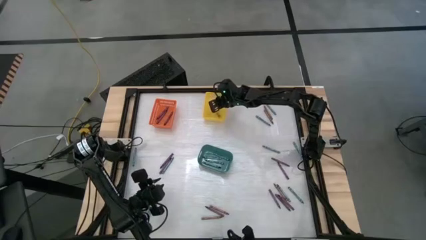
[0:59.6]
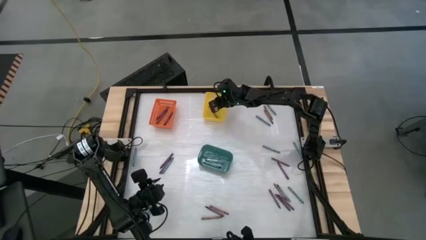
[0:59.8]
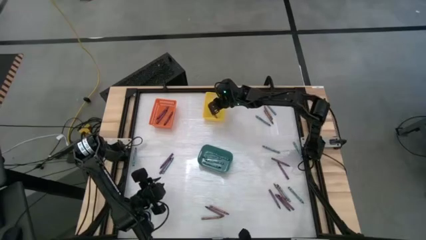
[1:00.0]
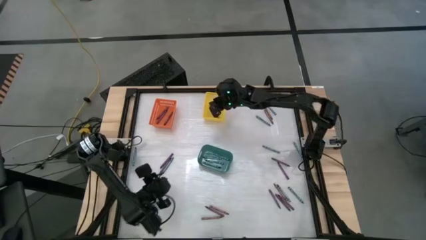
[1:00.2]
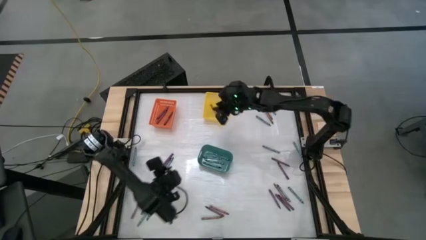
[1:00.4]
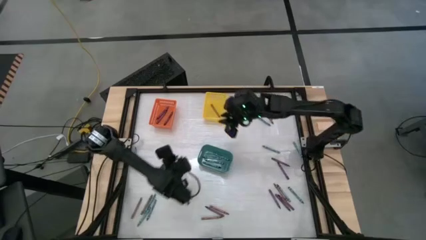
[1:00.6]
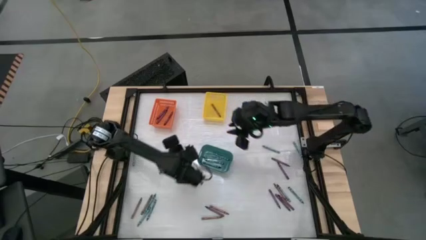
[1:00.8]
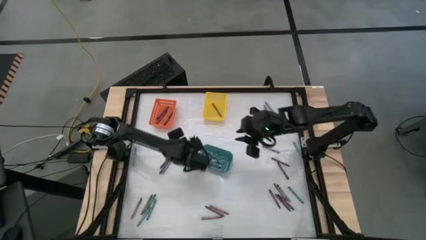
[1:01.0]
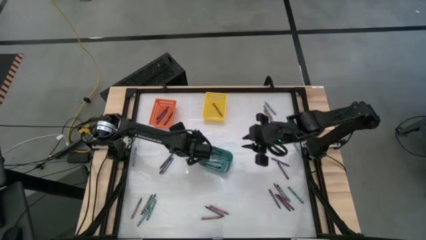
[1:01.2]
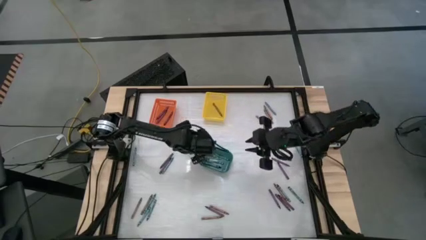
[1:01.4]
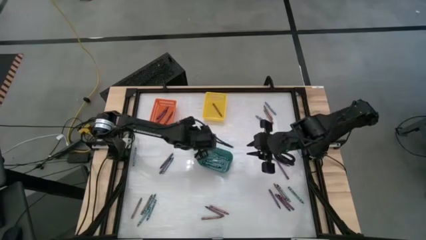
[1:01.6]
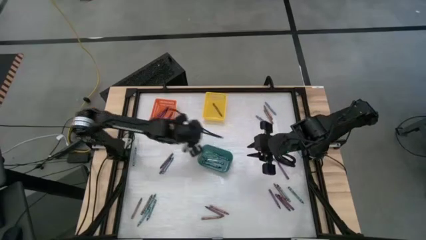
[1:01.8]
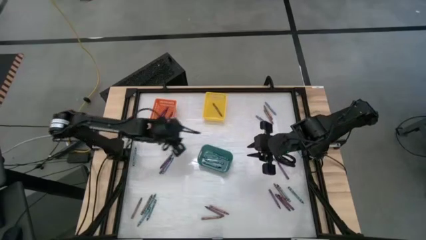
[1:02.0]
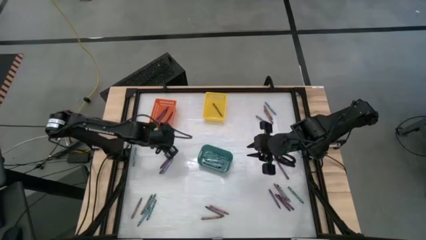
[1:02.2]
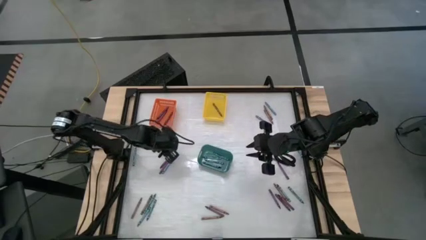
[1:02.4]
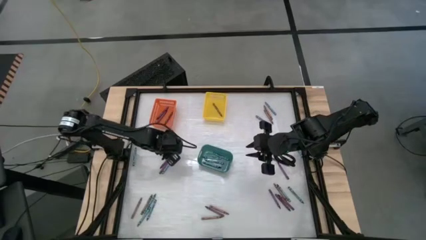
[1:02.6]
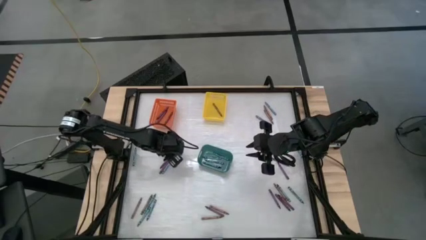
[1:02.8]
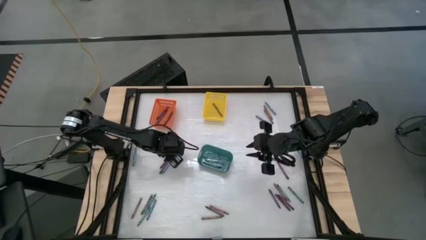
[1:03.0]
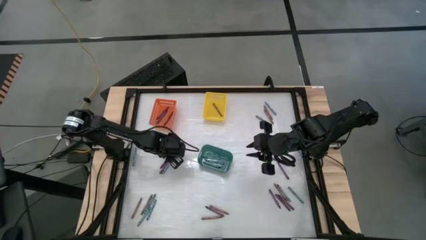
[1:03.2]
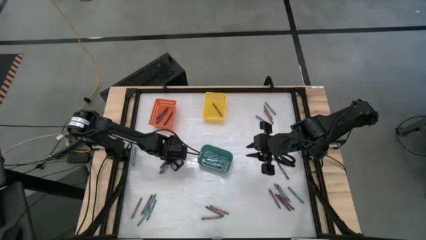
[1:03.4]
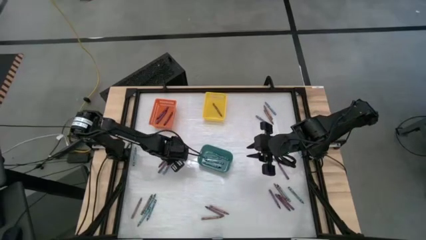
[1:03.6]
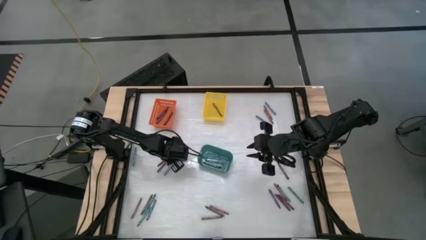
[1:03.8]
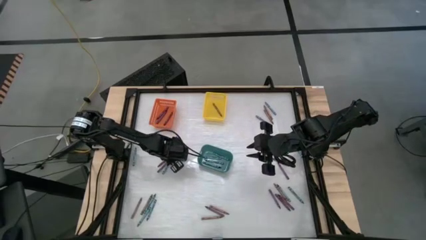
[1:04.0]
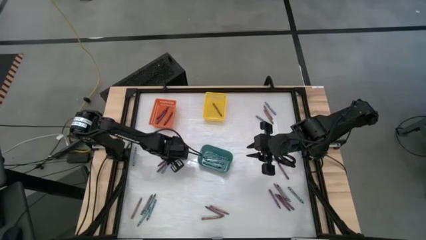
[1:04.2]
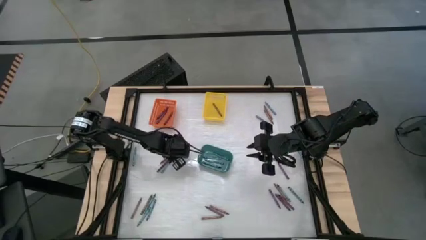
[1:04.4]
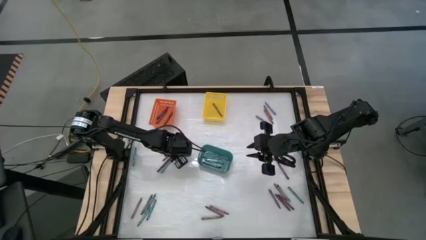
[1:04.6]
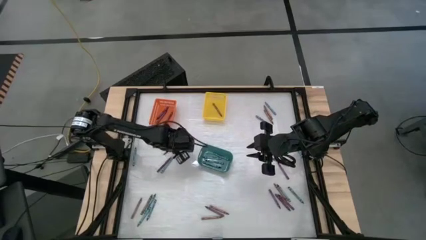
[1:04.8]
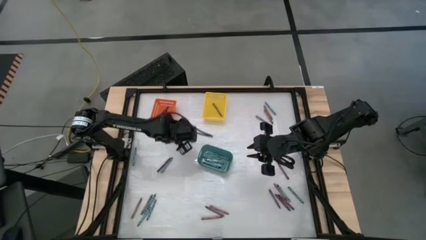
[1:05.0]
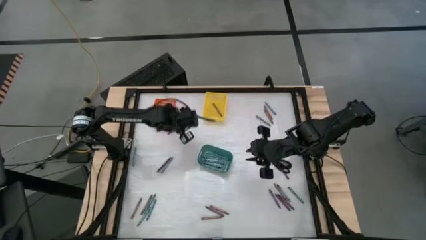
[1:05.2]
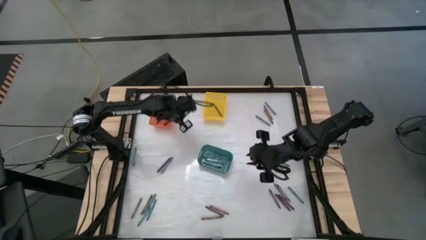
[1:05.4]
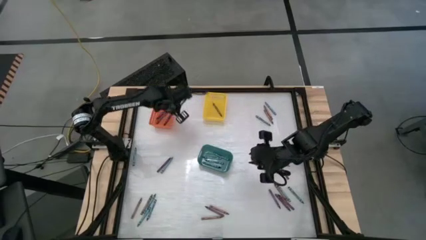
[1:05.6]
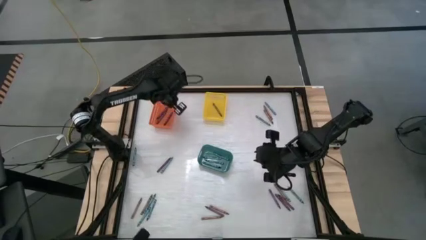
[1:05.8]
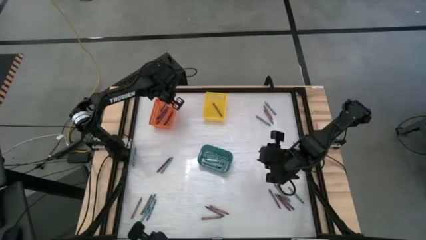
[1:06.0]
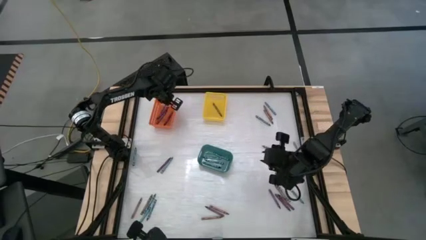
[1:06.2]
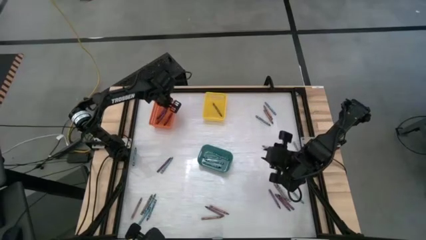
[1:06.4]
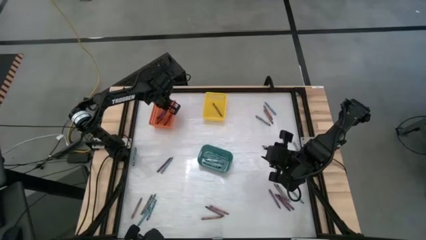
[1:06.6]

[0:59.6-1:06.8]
Task: Sort crayons
Put the violet crayon into the orange bin

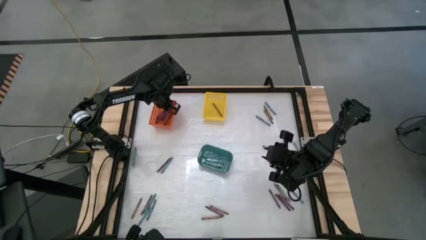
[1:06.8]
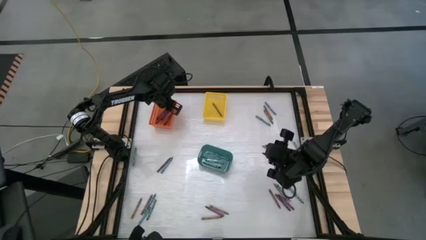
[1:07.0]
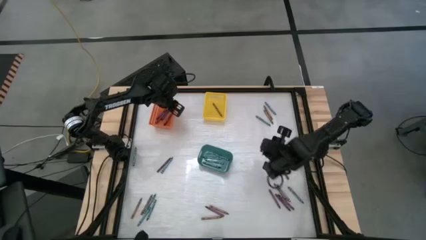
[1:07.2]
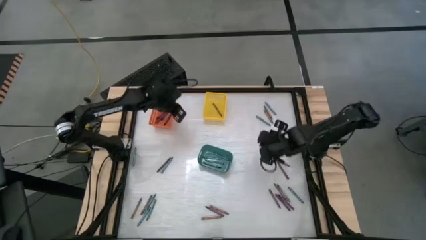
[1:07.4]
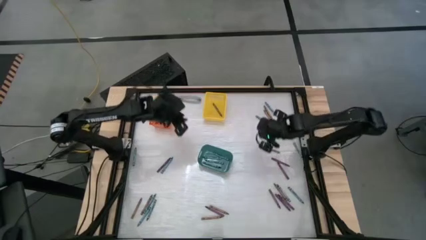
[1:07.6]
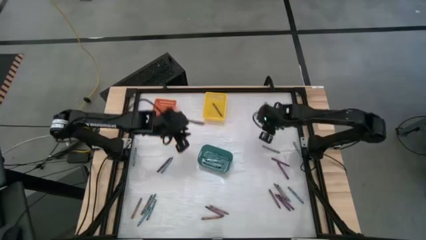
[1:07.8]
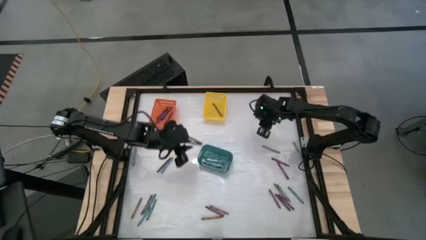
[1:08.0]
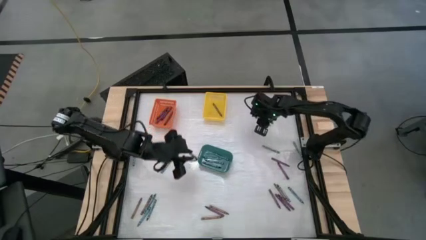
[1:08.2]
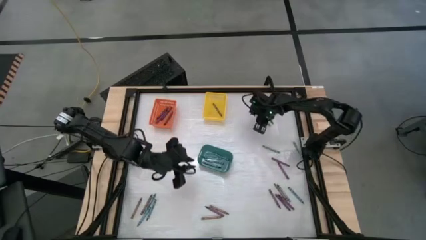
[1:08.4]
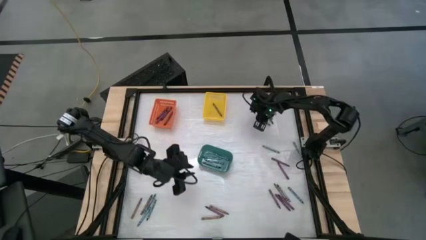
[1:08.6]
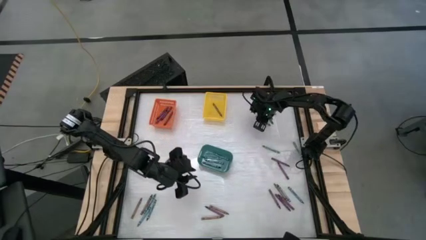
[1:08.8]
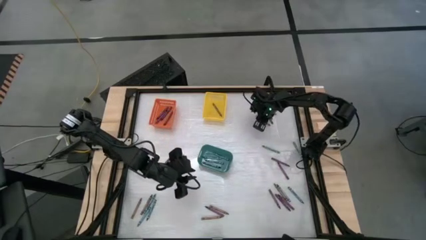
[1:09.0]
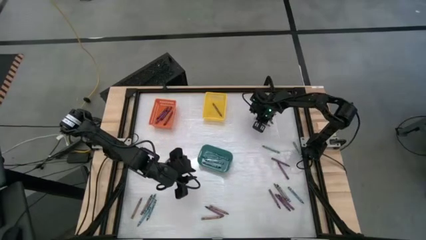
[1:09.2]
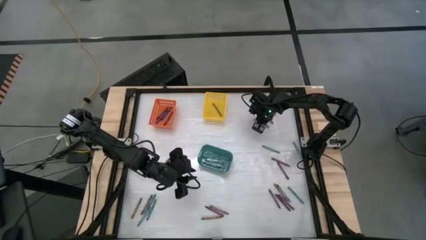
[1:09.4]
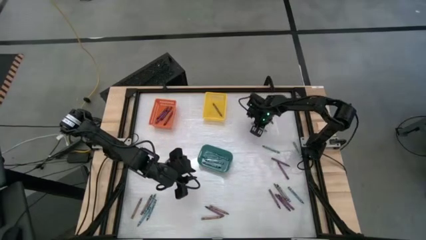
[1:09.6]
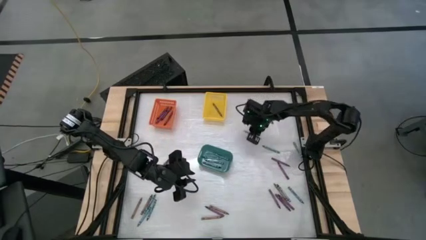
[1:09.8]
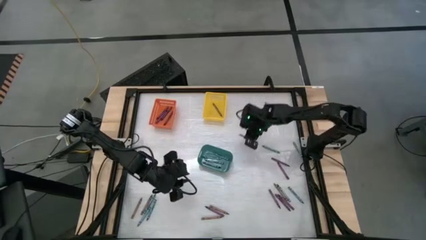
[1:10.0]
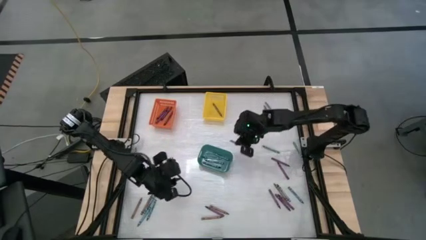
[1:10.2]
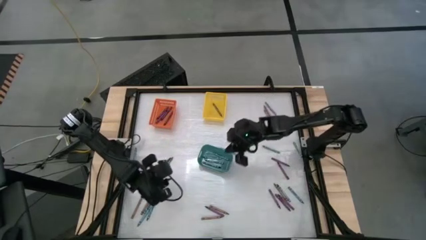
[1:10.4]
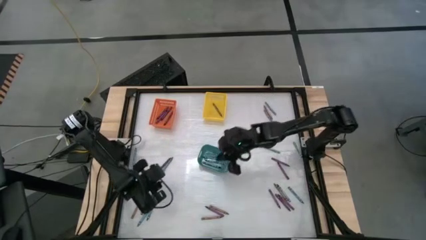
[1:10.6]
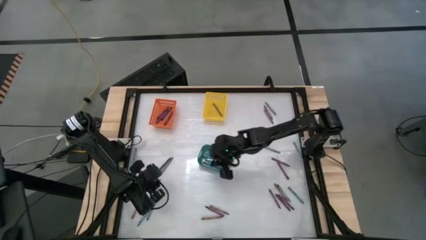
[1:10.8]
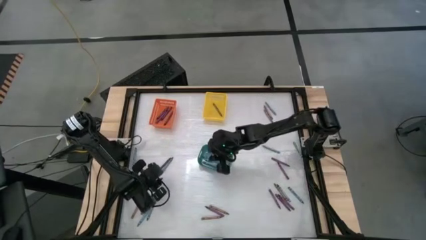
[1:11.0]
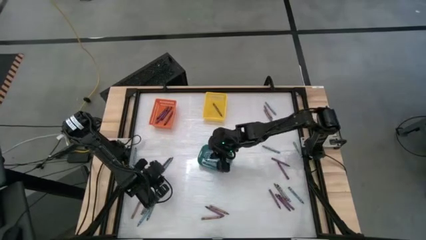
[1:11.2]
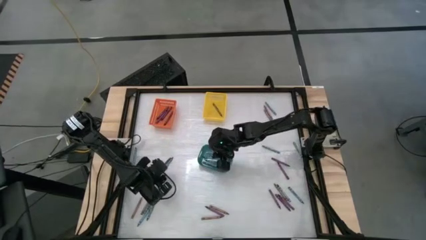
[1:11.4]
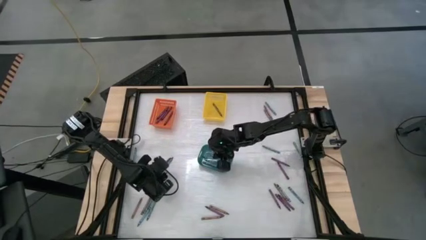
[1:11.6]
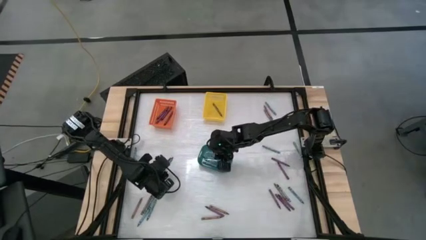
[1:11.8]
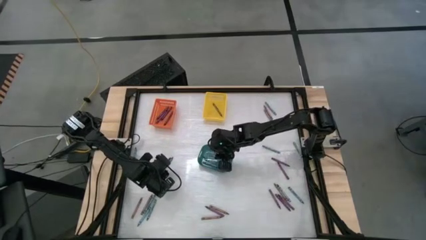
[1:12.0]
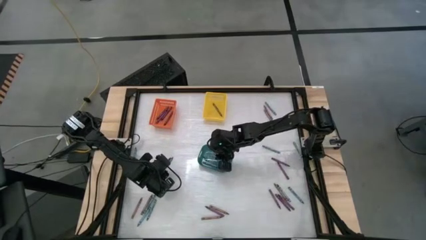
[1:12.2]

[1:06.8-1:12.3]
Put the blue crayon into the blue bin

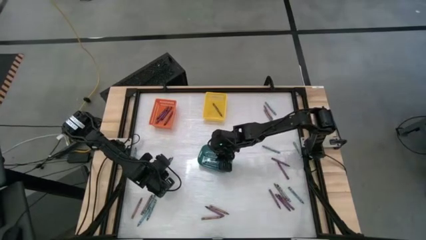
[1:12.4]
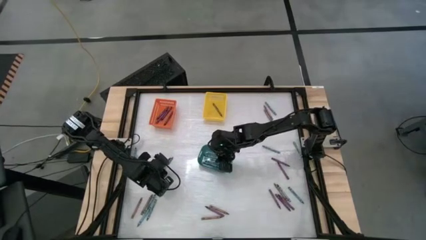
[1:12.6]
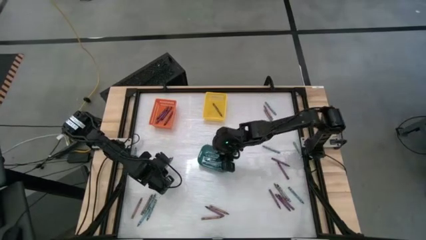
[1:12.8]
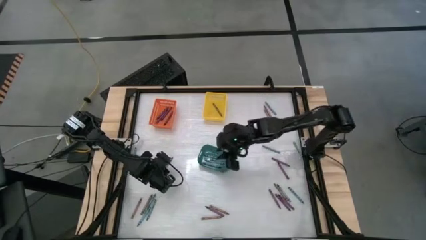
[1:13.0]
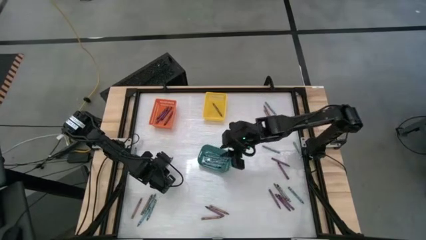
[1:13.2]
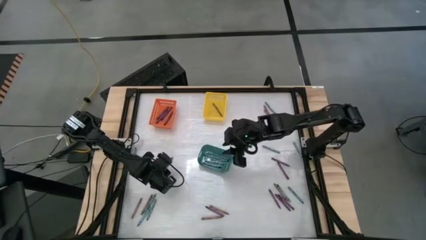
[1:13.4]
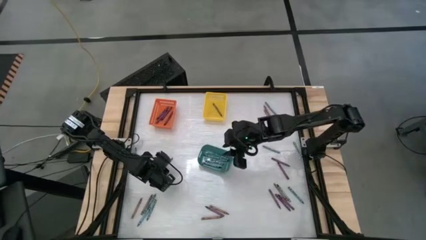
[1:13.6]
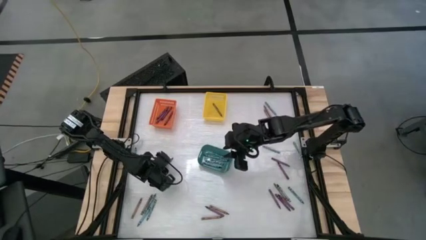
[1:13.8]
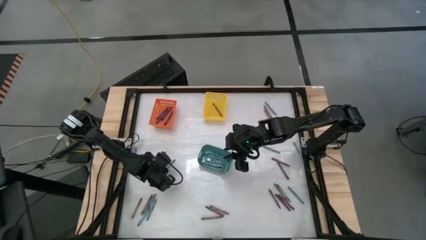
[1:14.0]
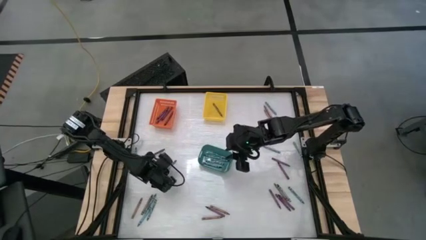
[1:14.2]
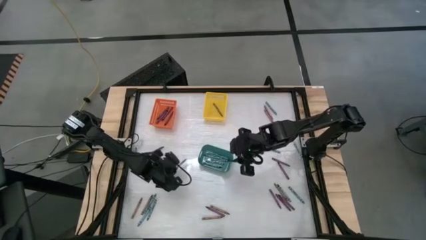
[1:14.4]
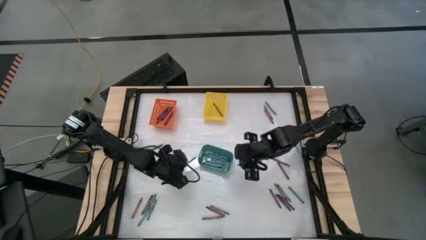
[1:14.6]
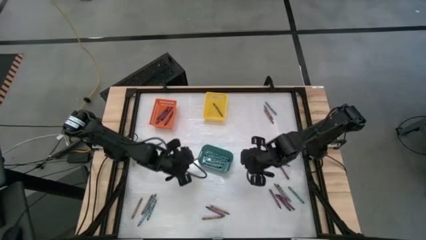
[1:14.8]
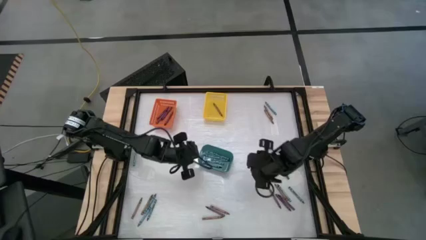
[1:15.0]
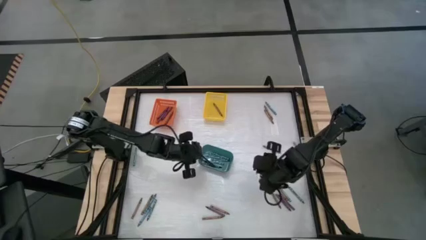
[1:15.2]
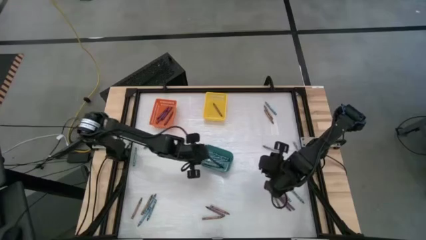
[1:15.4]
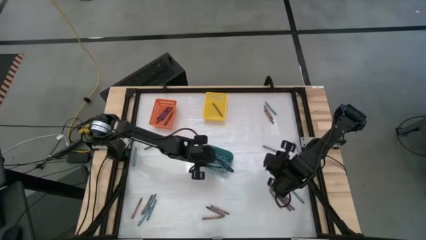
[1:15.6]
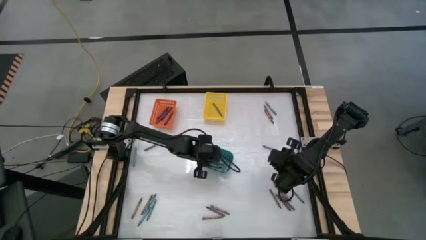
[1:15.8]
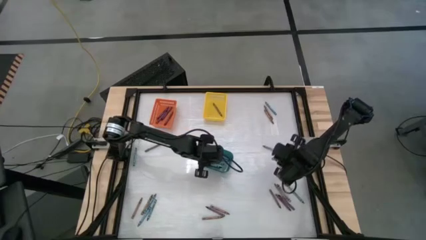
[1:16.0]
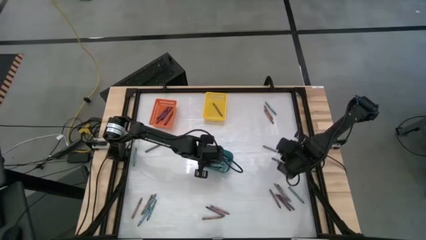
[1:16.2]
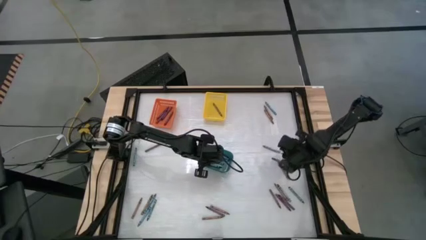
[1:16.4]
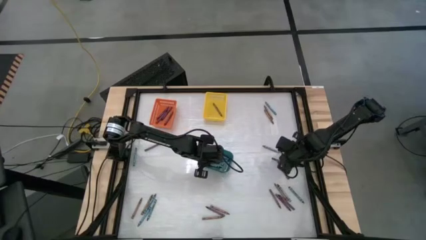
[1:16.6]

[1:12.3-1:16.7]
Put the blue crayon into the blue bin
